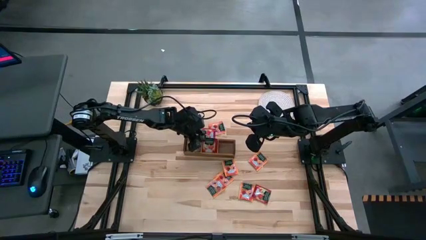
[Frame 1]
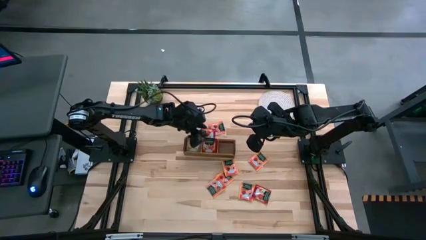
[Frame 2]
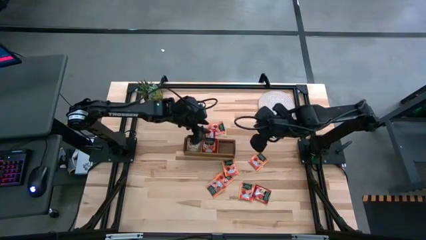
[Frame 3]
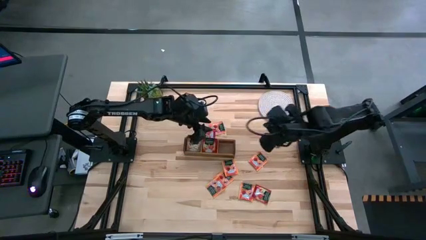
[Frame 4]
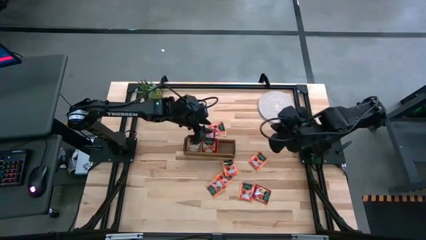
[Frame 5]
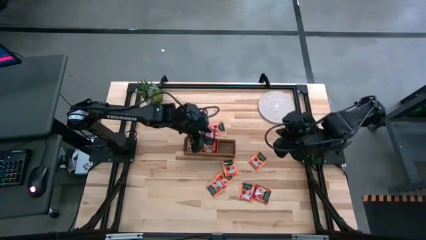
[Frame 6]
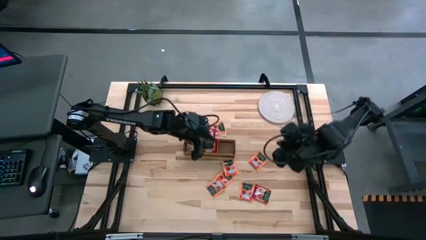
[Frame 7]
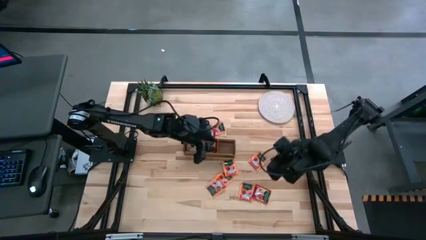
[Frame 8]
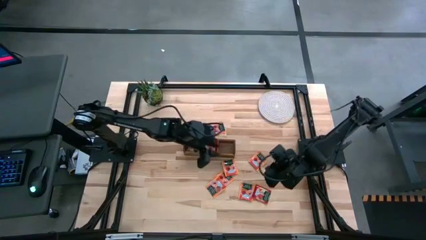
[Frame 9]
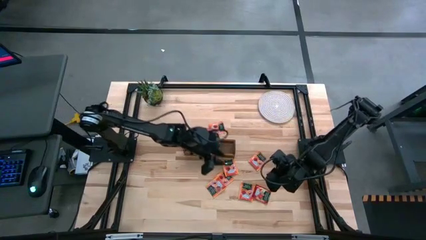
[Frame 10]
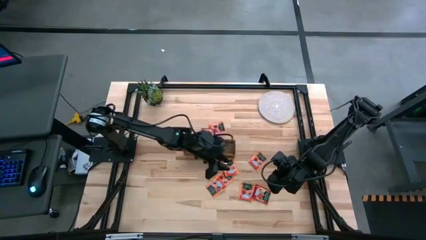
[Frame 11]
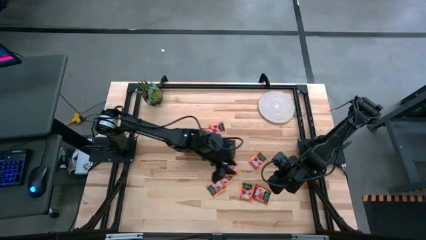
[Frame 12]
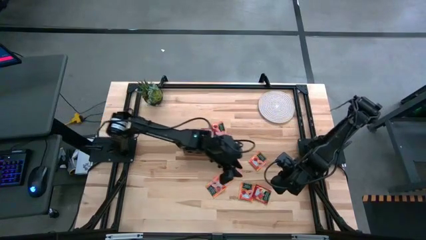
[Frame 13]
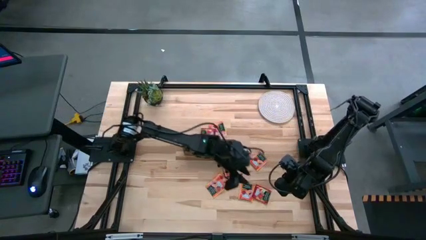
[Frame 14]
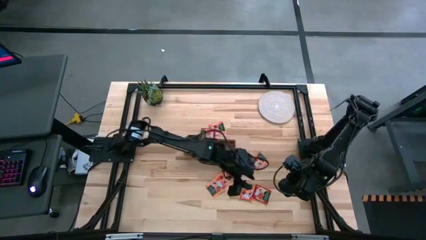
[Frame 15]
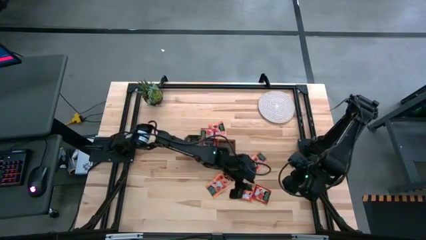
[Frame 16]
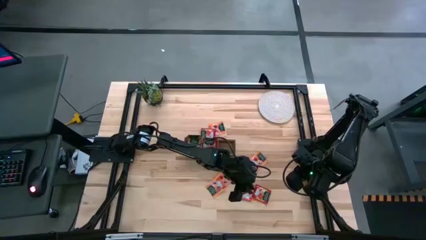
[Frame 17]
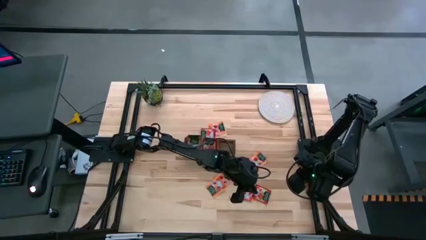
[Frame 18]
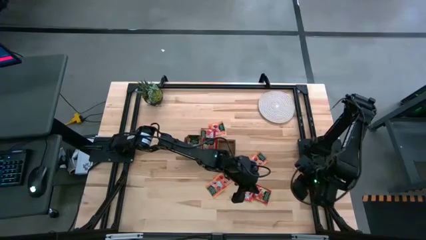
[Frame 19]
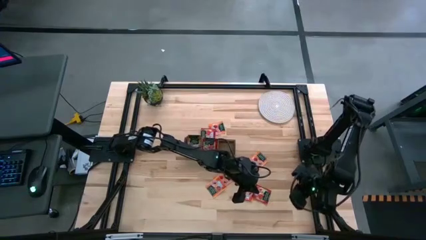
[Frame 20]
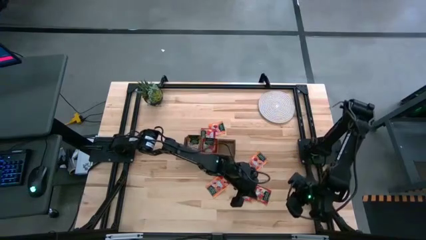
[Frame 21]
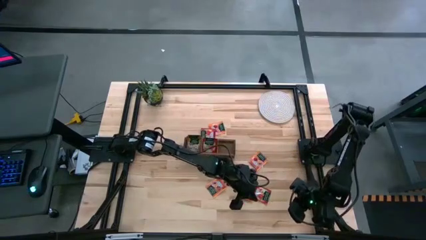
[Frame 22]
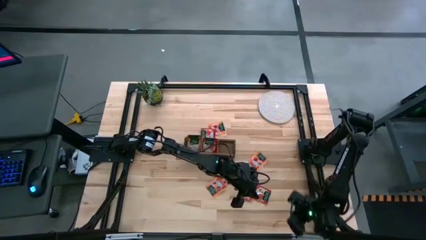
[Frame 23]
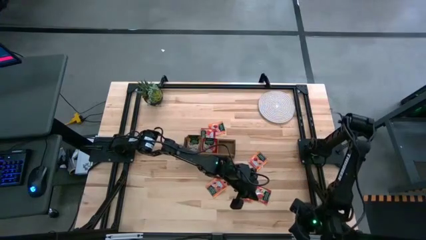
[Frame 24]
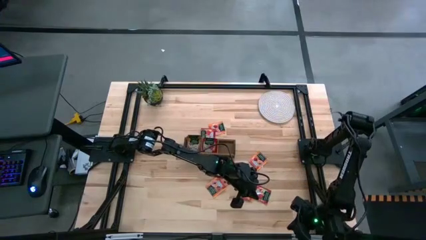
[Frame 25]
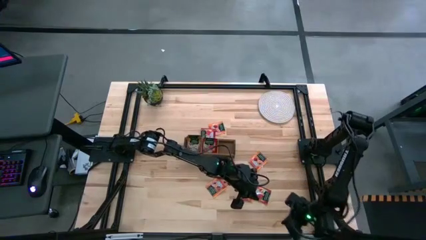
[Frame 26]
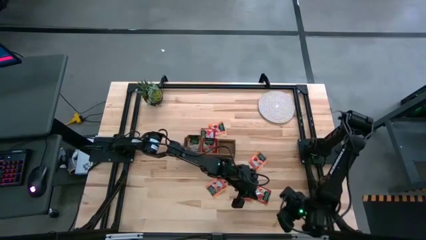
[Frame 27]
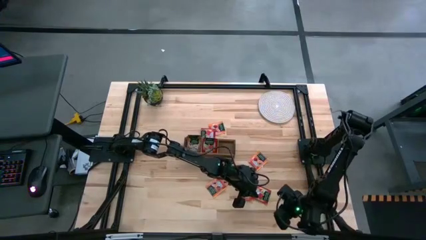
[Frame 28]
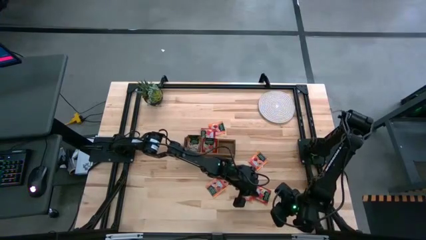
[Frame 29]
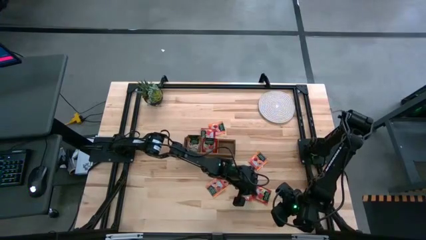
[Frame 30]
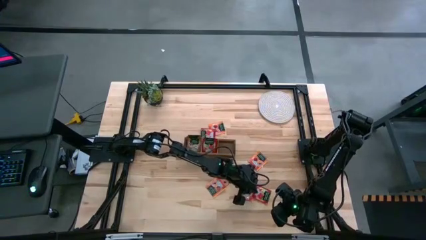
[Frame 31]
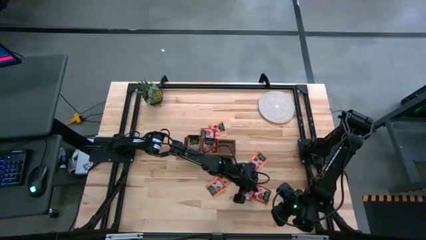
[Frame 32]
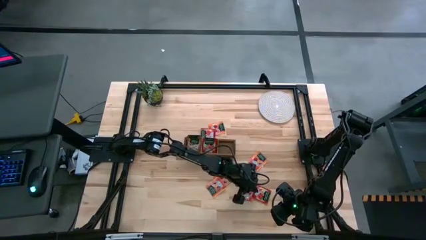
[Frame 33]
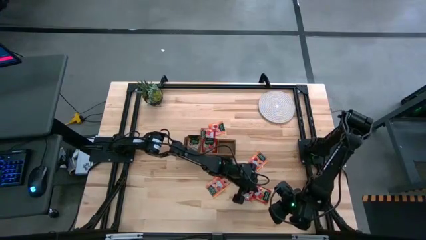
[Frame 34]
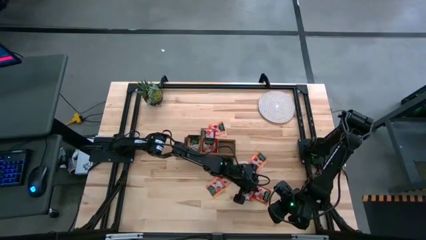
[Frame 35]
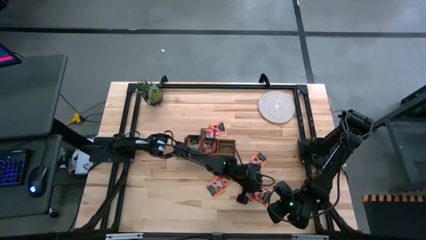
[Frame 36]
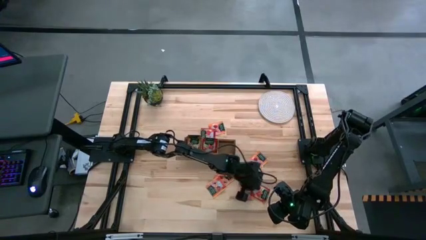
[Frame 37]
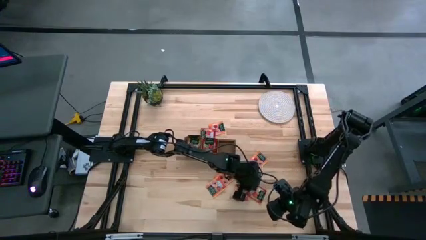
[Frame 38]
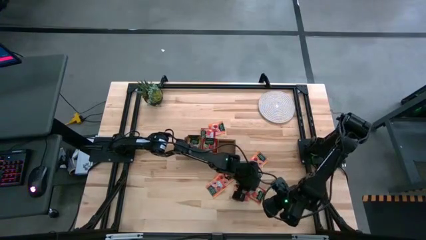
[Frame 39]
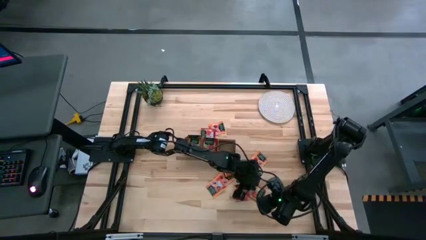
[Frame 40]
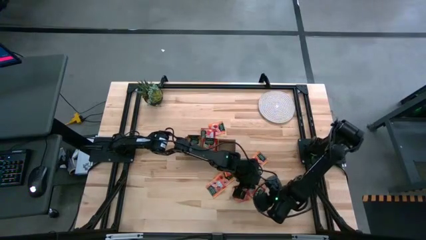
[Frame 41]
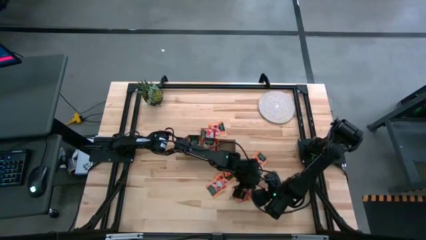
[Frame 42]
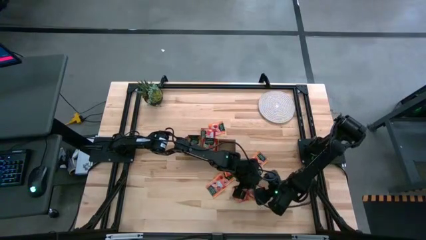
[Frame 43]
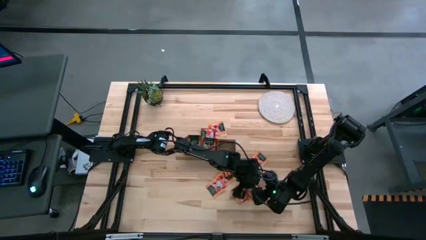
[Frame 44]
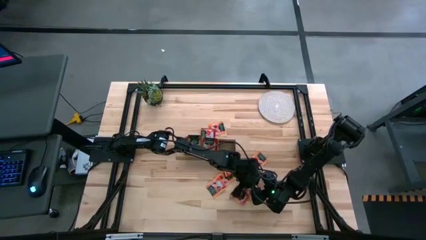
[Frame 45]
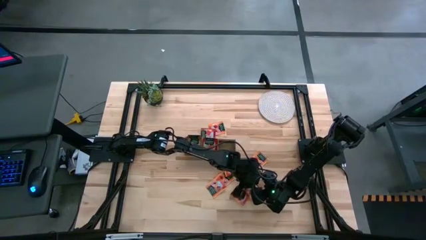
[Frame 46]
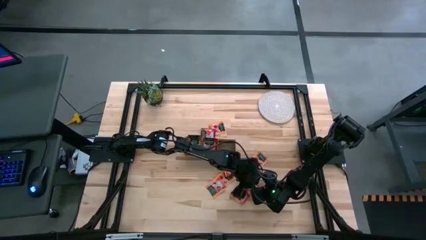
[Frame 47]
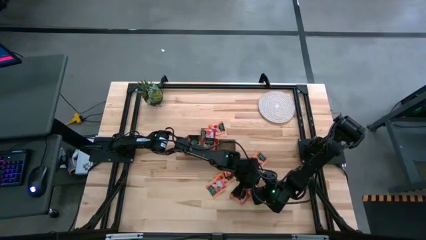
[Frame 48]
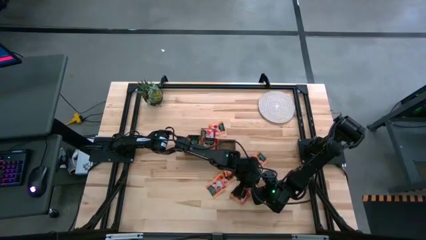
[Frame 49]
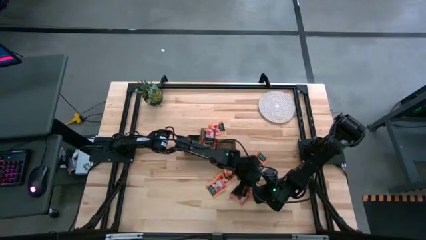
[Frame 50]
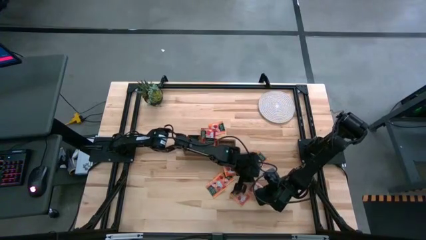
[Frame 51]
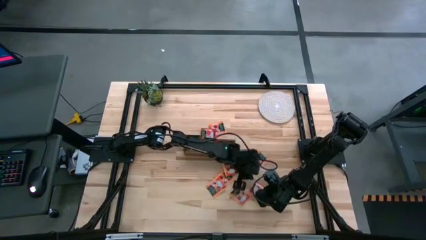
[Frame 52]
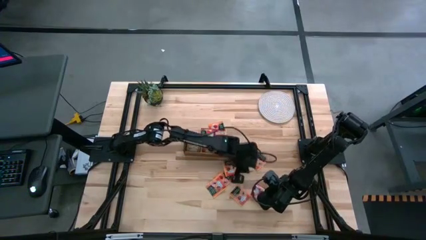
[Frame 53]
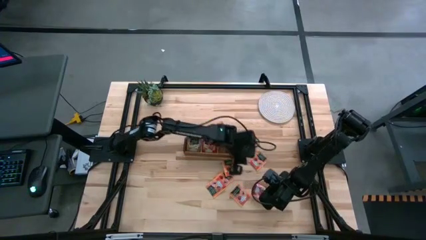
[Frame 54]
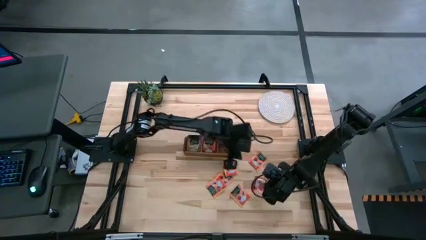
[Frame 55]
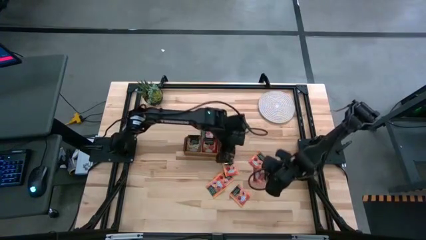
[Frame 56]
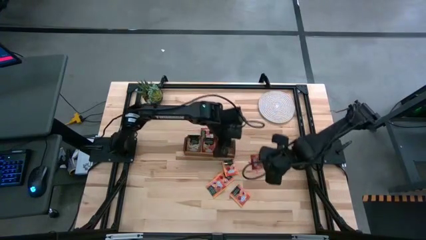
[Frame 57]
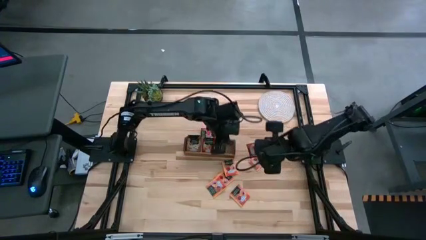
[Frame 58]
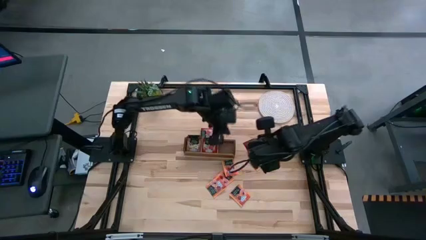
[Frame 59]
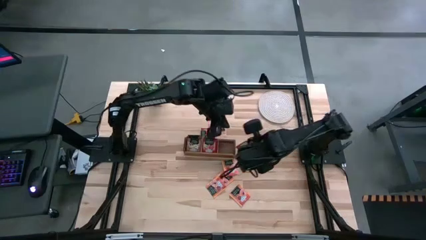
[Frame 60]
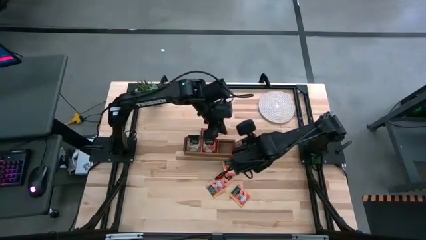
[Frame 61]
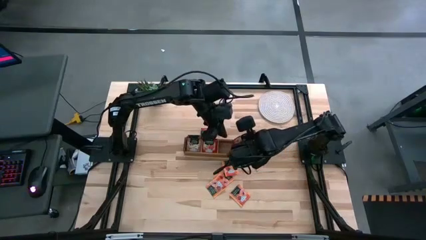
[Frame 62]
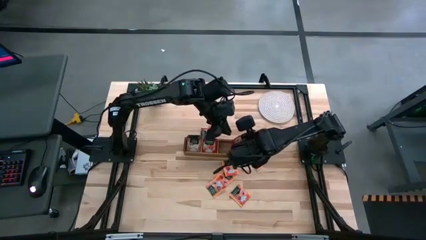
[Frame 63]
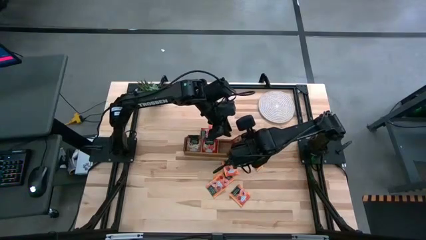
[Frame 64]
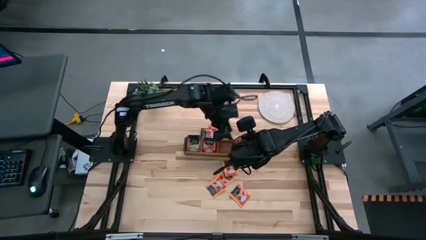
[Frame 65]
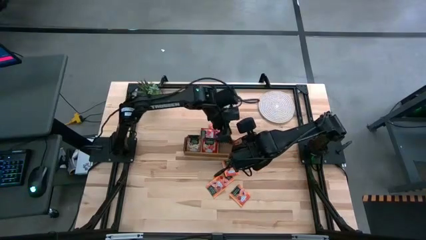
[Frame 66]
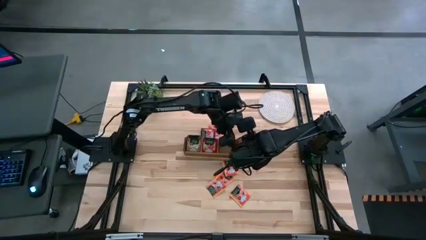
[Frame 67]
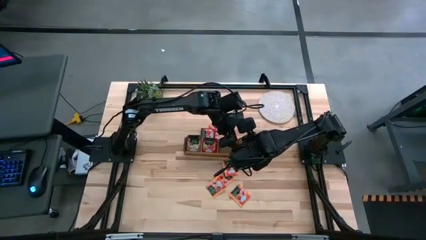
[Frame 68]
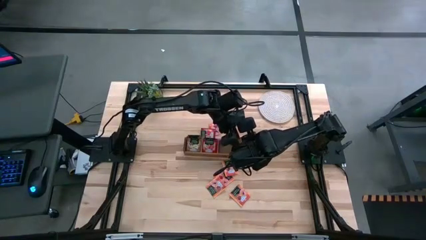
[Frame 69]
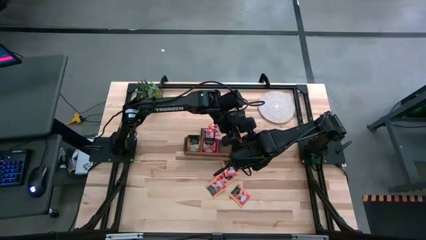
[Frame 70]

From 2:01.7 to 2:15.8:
Task: Pick & Place Tea
Put the red tea bag into the middle section of the brown wooden organizer
